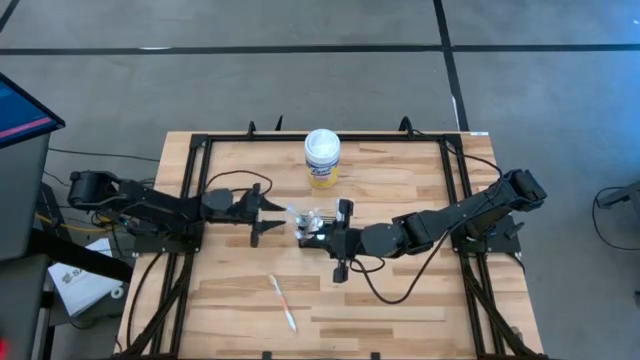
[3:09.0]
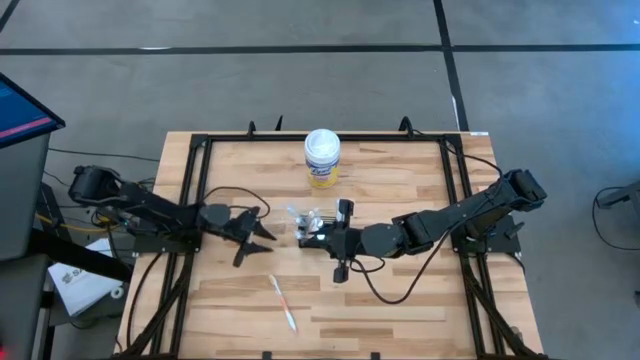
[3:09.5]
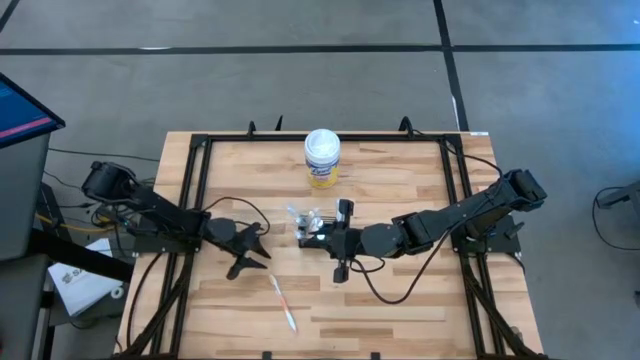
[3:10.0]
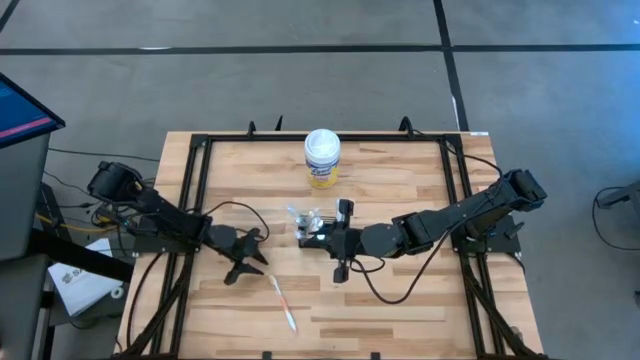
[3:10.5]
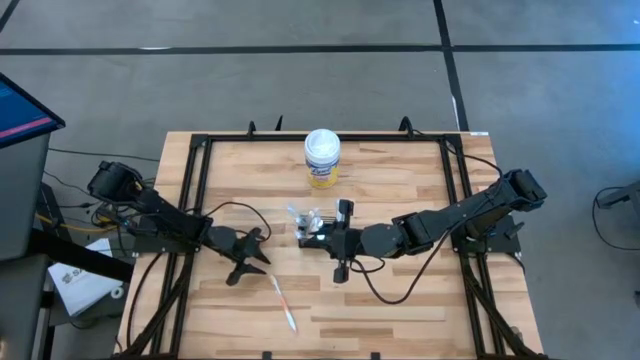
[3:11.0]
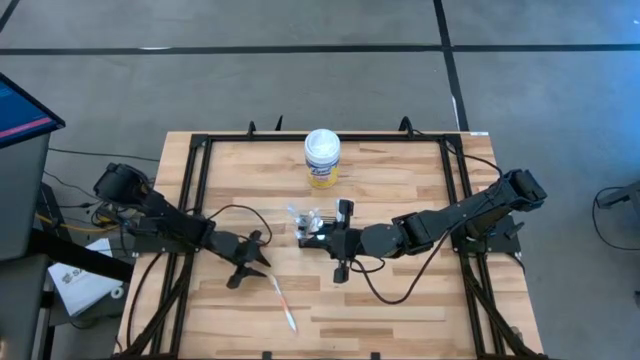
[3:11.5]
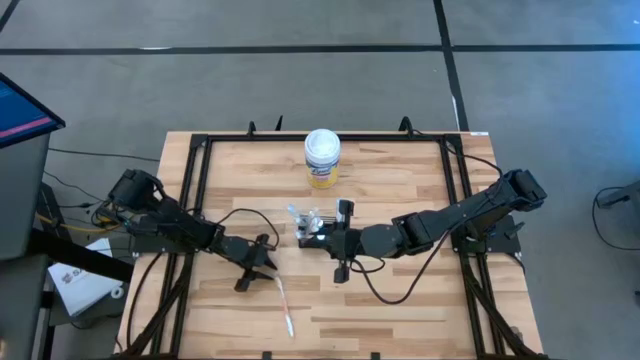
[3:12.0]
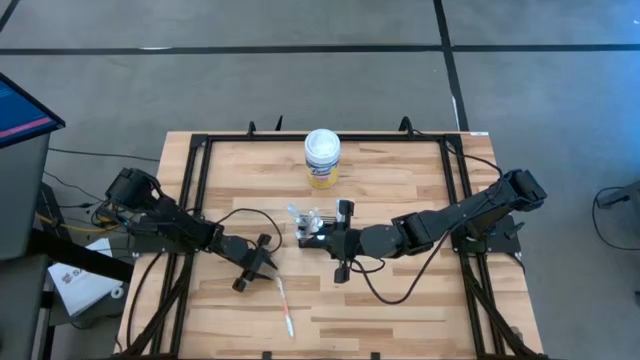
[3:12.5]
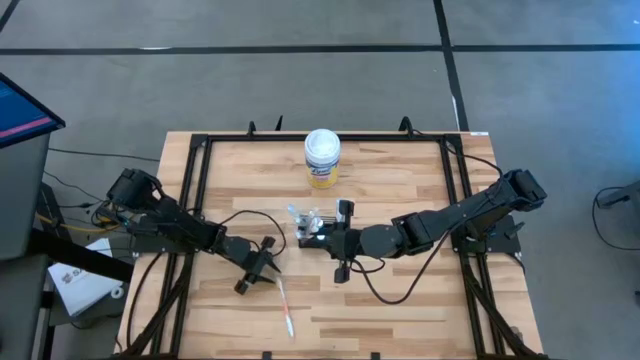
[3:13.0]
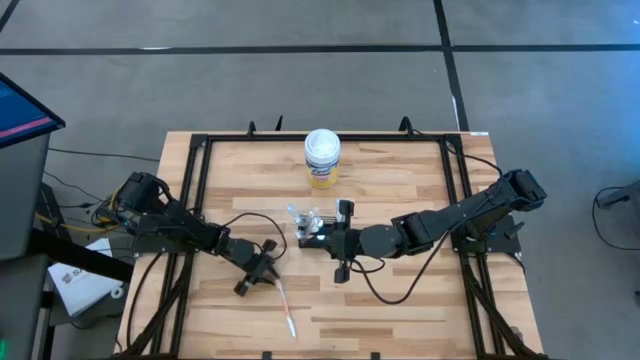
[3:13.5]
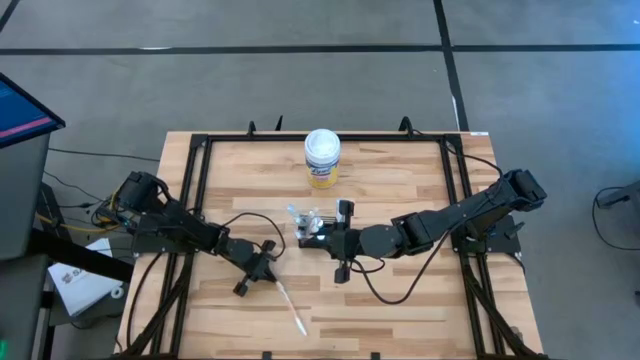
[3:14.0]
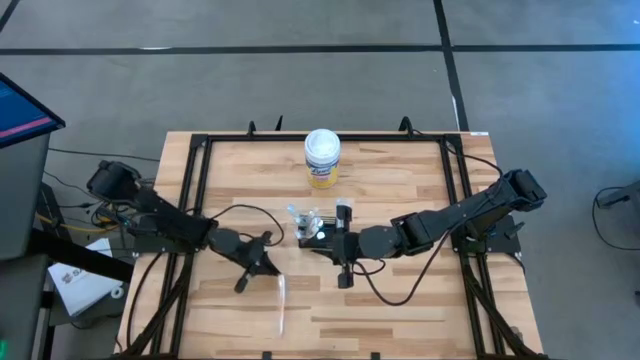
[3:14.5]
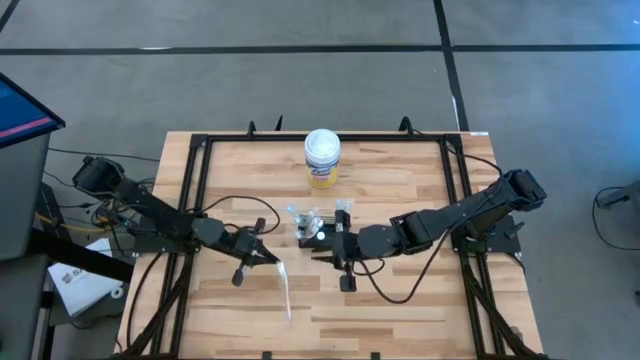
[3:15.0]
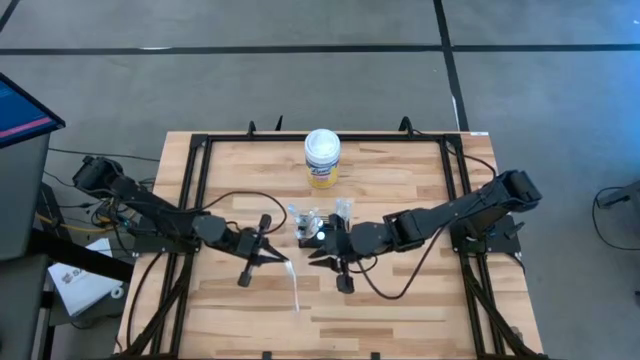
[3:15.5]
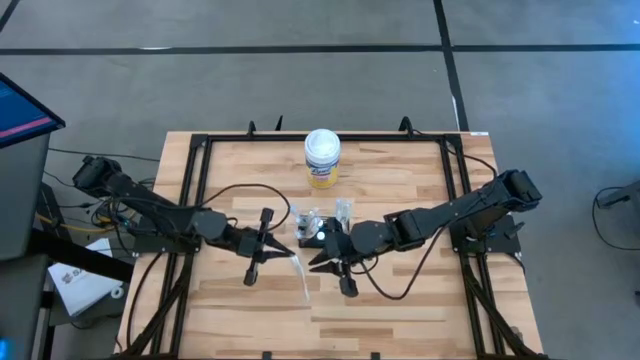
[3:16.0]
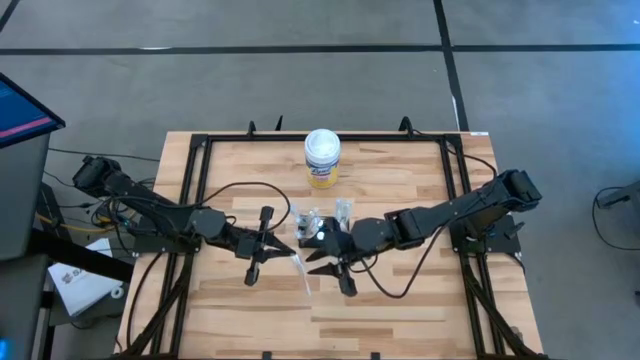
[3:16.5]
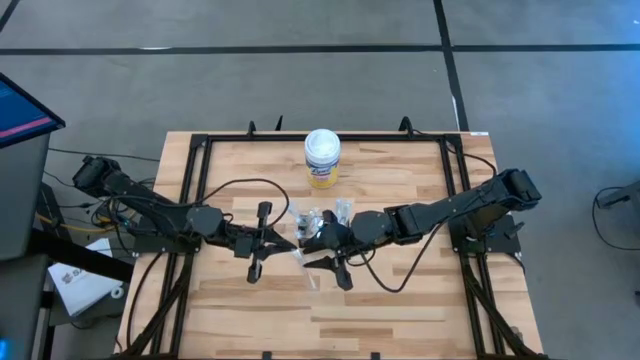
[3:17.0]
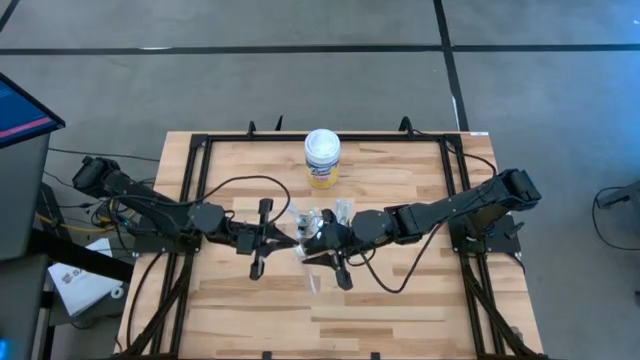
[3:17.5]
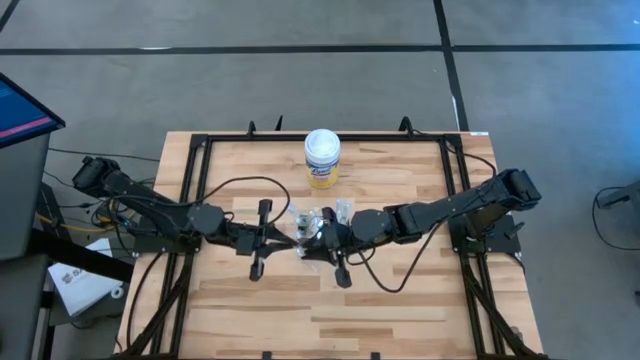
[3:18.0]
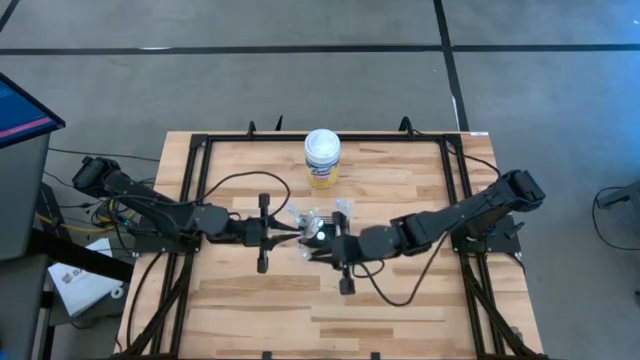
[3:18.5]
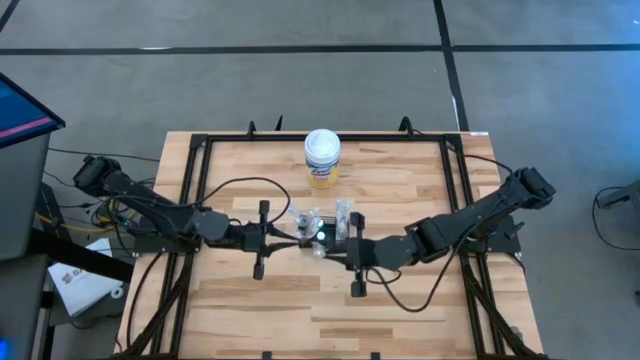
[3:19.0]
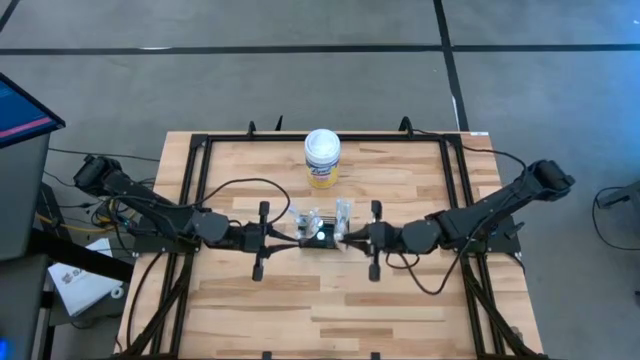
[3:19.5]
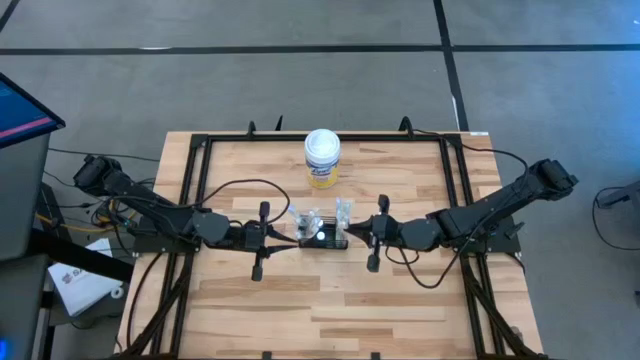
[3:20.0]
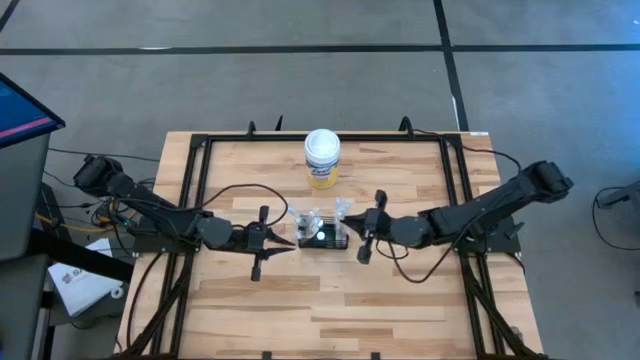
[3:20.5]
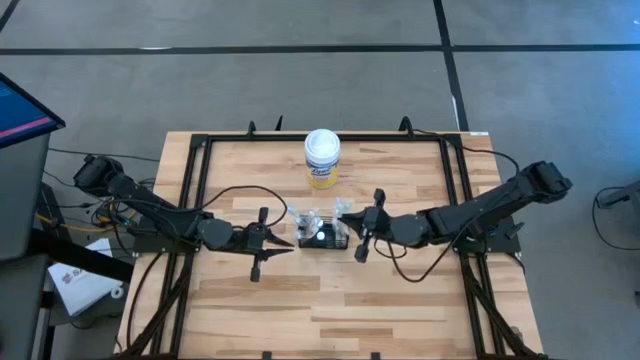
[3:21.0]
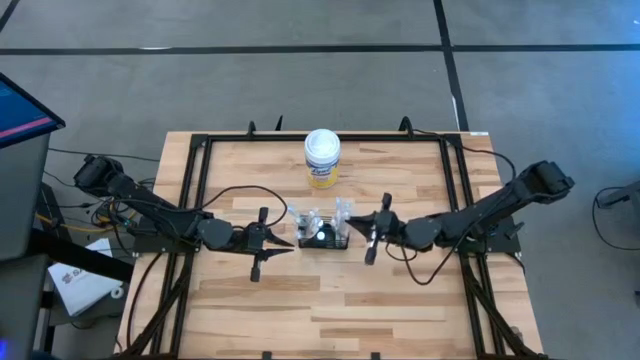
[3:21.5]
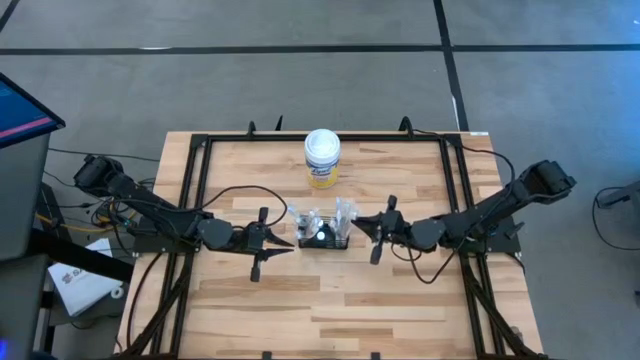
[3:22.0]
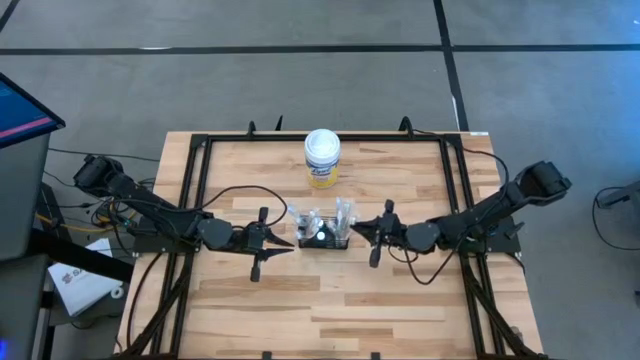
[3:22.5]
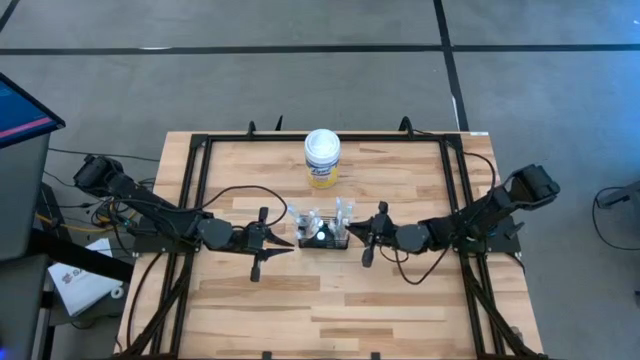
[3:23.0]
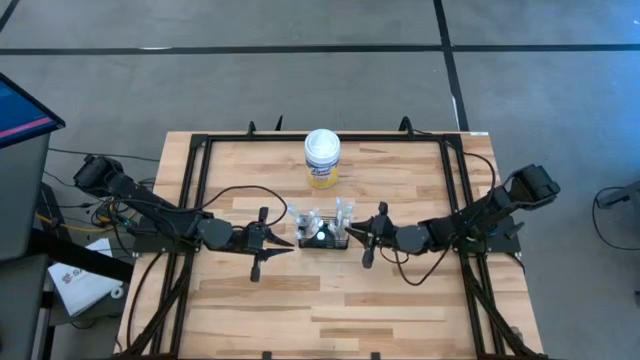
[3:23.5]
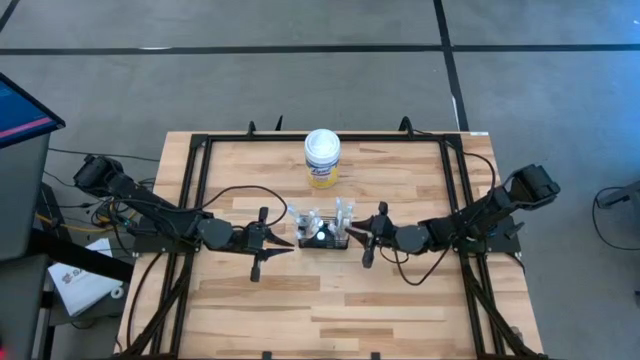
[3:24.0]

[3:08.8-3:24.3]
Task: Pick & Place toothbrushing station
Put the orange toothbrush into the black mesh organizer

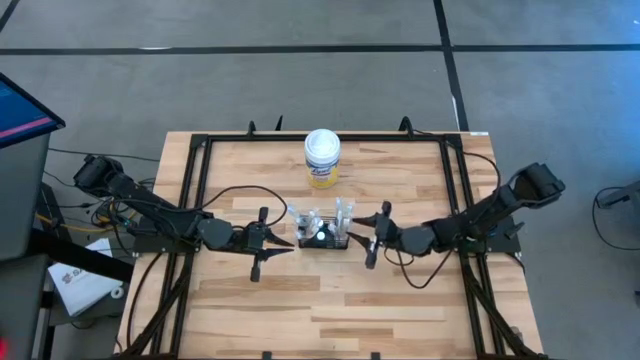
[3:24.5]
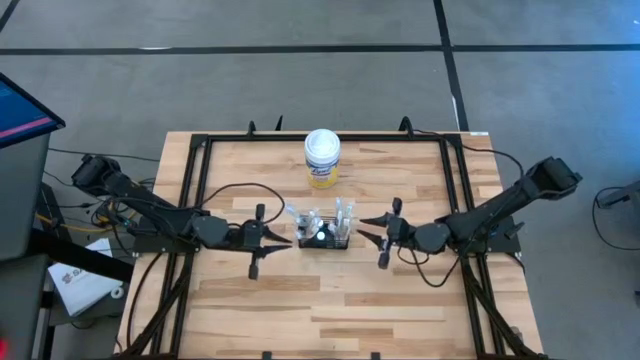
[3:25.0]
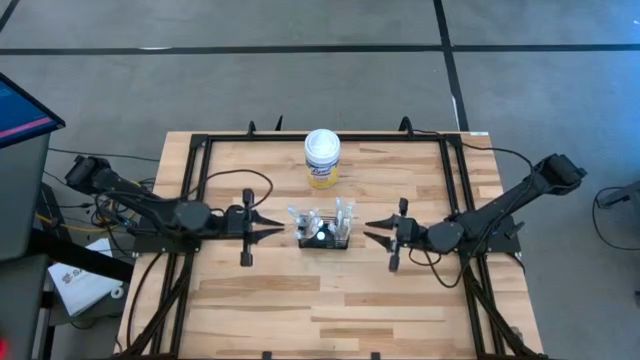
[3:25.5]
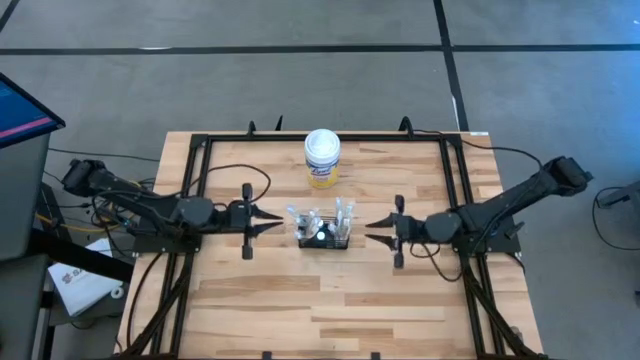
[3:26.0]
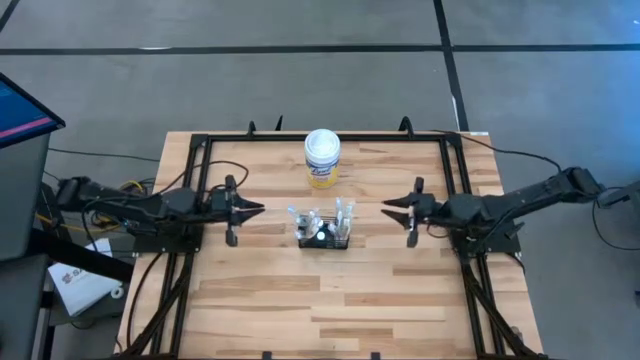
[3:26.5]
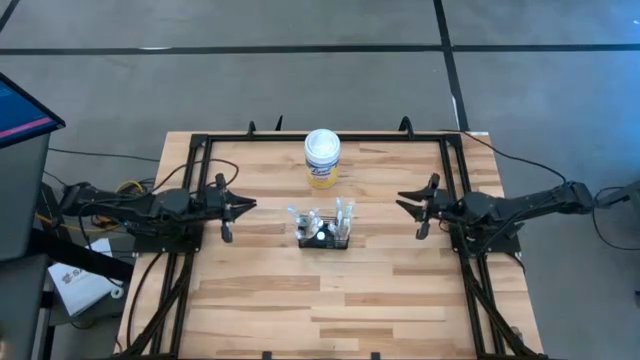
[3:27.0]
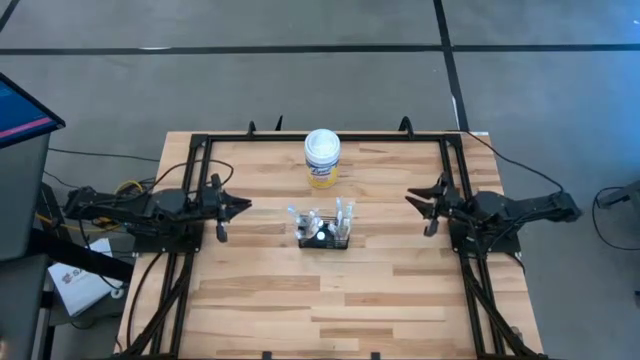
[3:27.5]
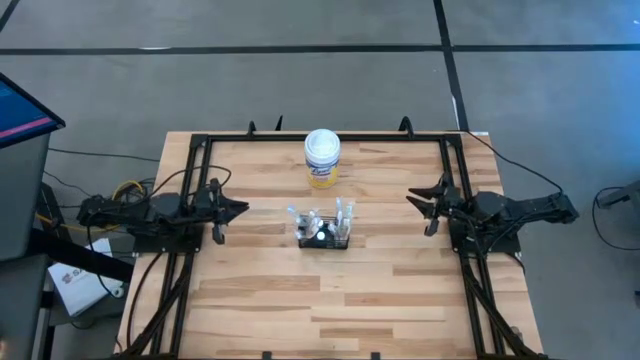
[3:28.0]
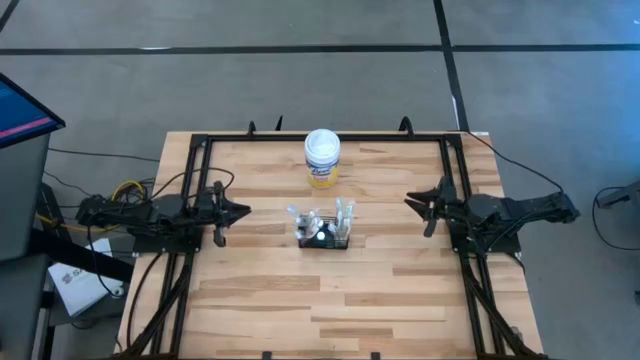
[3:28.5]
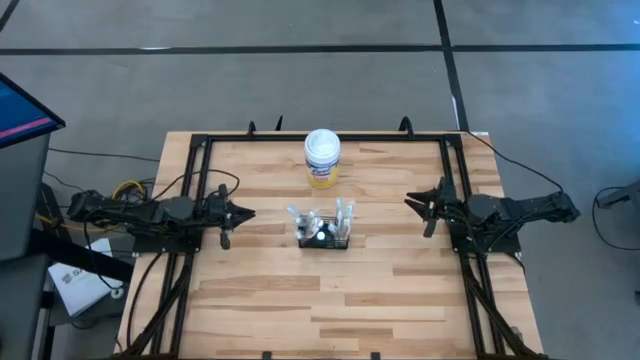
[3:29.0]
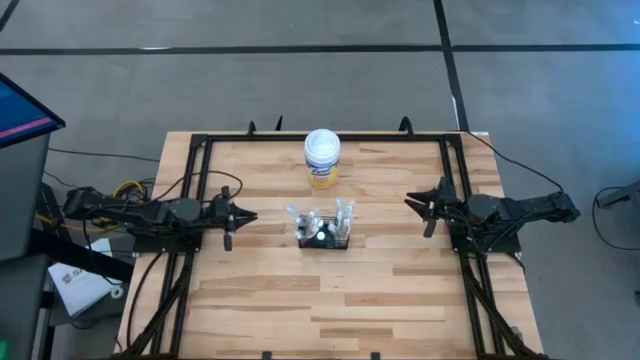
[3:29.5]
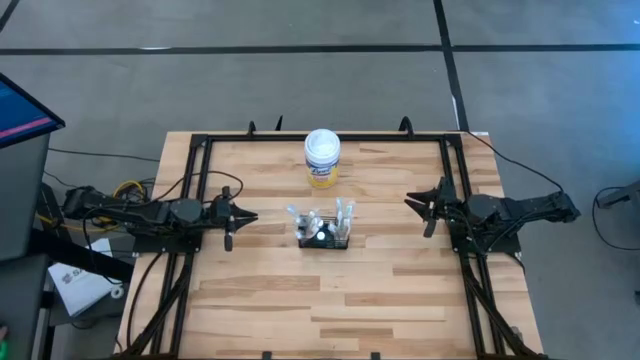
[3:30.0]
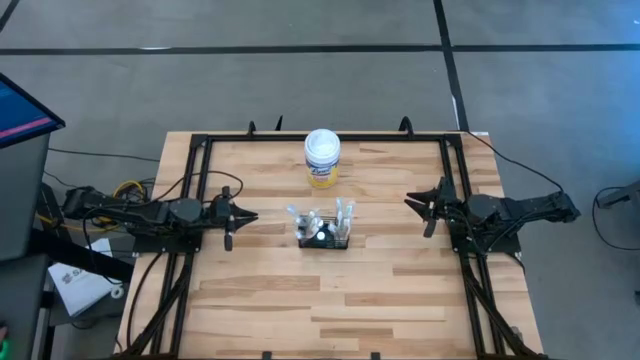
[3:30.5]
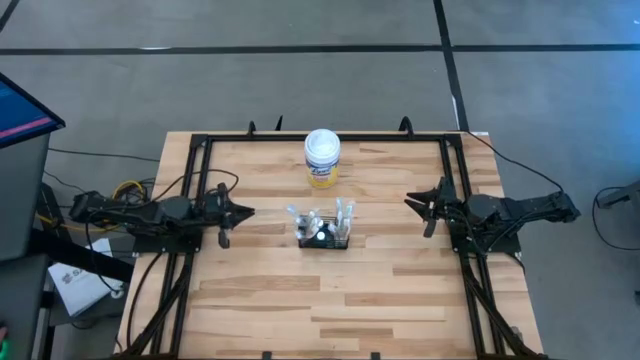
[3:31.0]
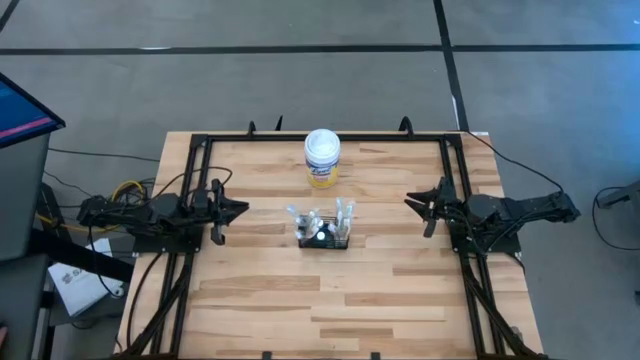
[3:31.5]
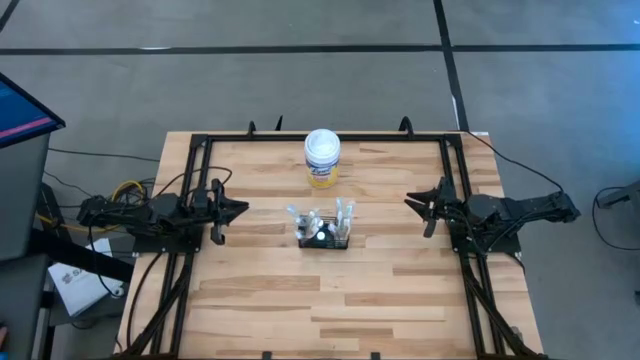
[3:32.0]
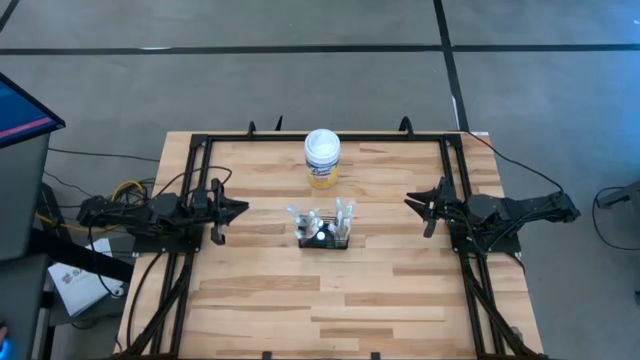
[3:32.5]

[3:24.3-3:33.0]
Return to Home Position
